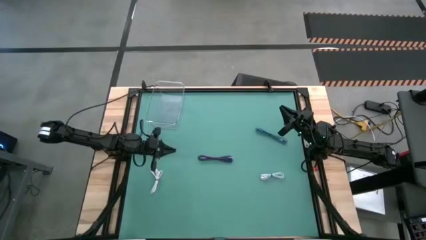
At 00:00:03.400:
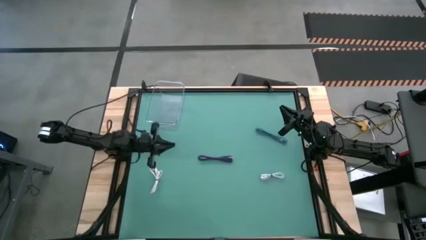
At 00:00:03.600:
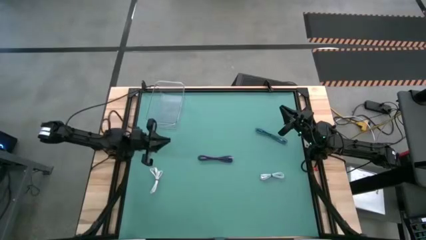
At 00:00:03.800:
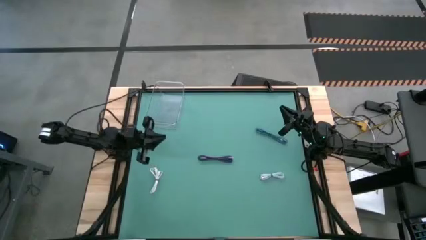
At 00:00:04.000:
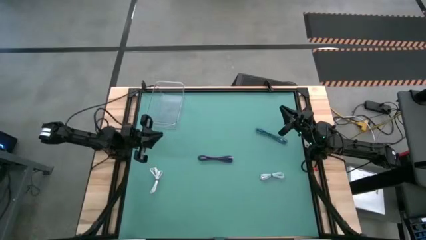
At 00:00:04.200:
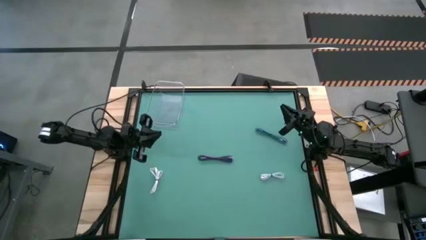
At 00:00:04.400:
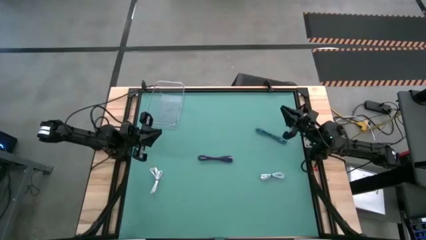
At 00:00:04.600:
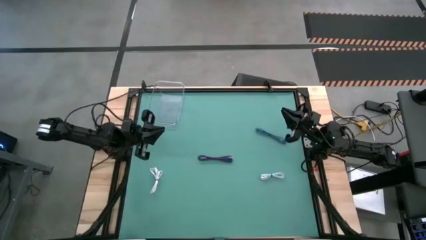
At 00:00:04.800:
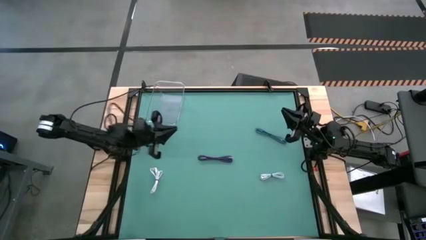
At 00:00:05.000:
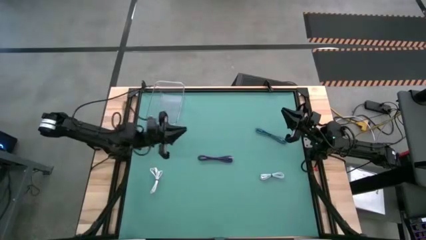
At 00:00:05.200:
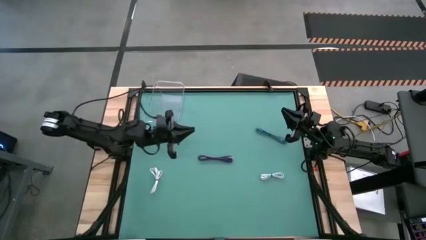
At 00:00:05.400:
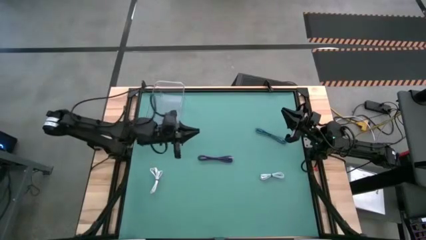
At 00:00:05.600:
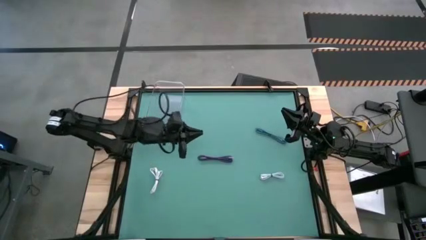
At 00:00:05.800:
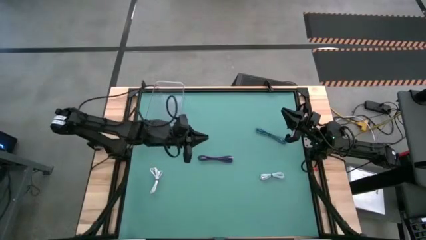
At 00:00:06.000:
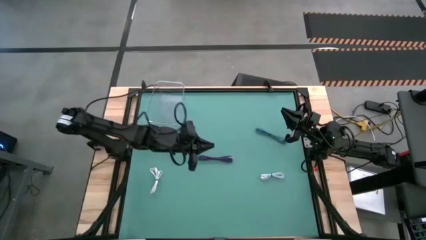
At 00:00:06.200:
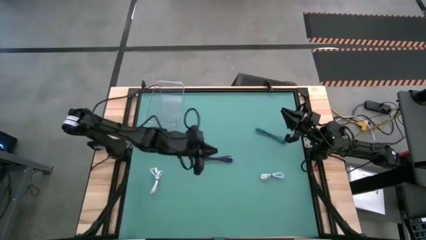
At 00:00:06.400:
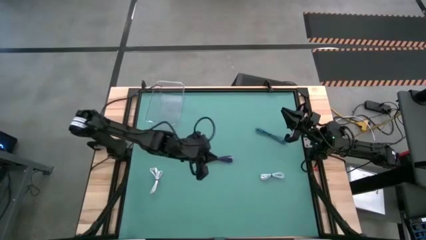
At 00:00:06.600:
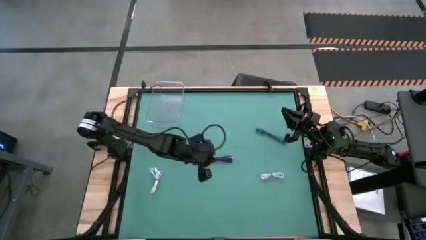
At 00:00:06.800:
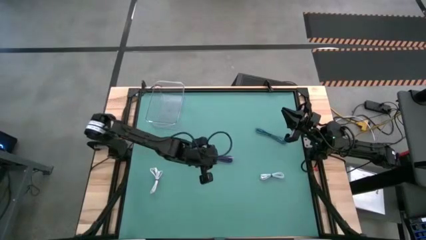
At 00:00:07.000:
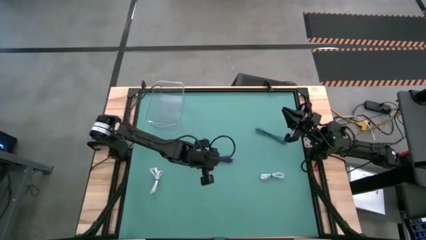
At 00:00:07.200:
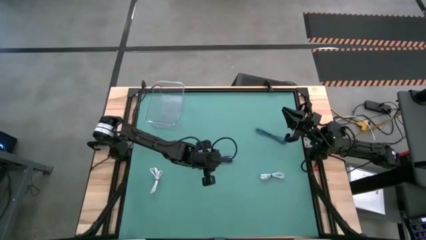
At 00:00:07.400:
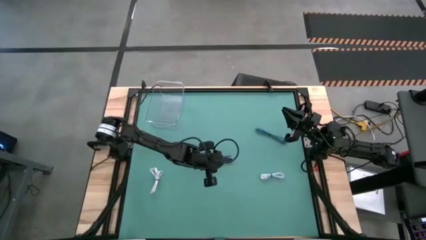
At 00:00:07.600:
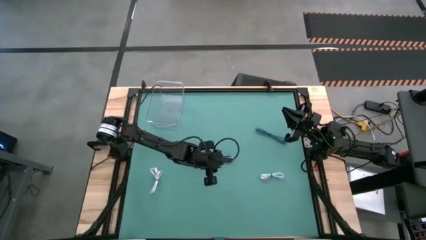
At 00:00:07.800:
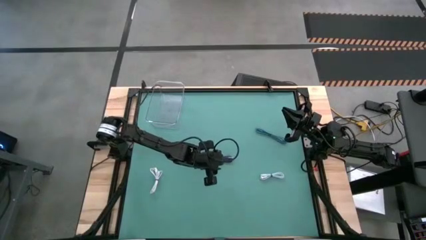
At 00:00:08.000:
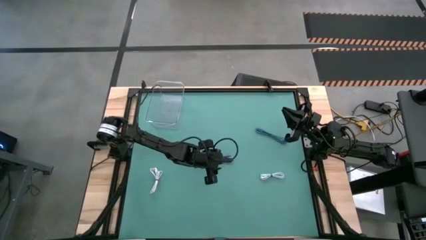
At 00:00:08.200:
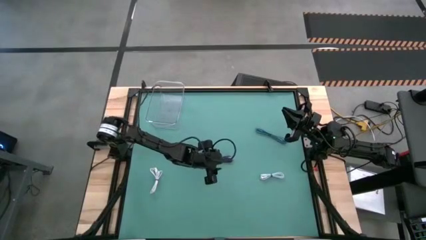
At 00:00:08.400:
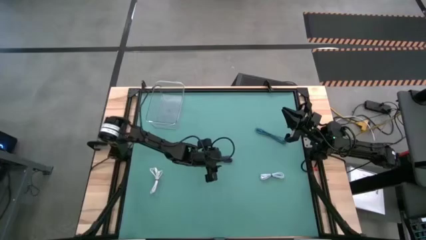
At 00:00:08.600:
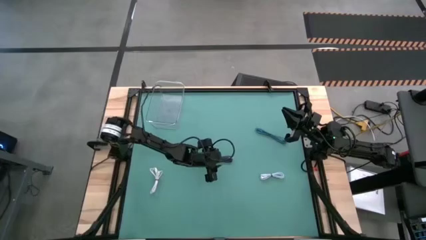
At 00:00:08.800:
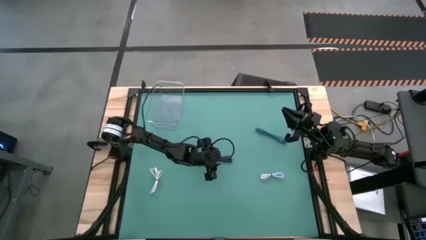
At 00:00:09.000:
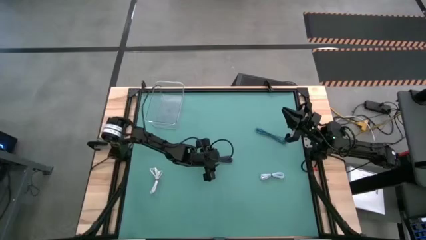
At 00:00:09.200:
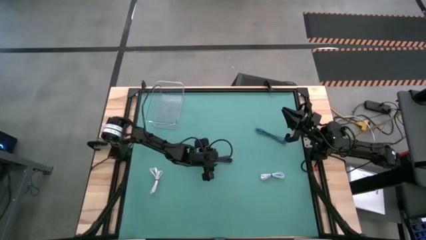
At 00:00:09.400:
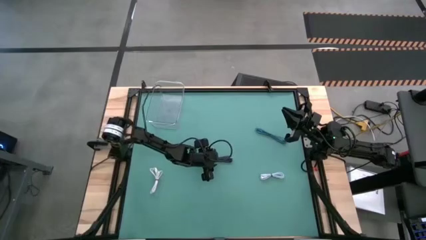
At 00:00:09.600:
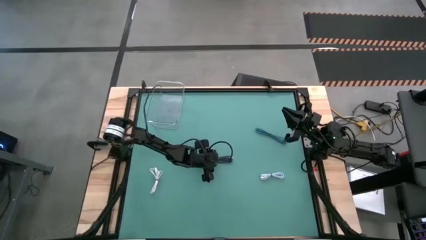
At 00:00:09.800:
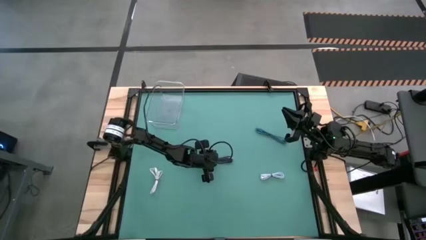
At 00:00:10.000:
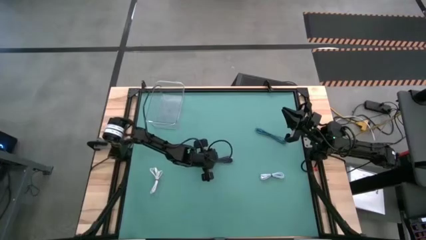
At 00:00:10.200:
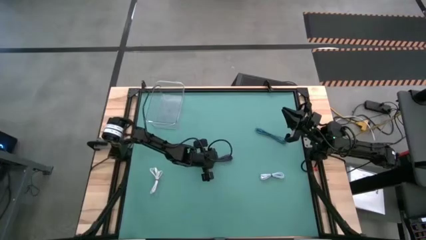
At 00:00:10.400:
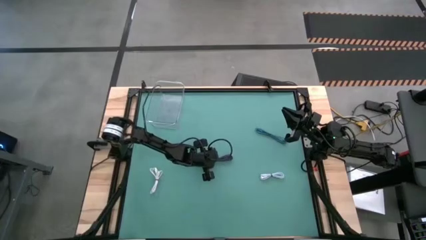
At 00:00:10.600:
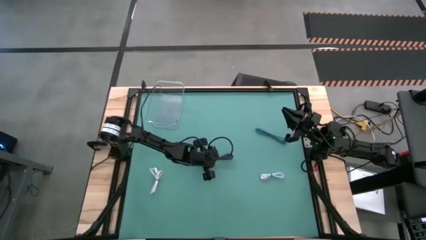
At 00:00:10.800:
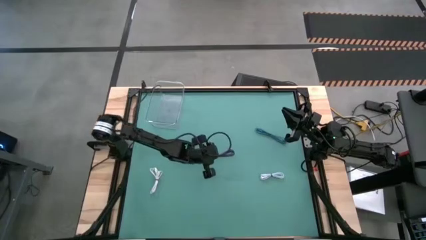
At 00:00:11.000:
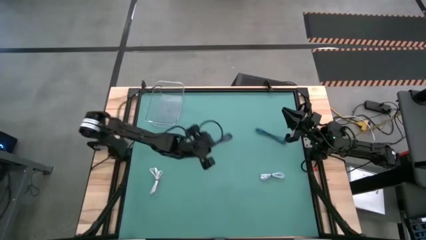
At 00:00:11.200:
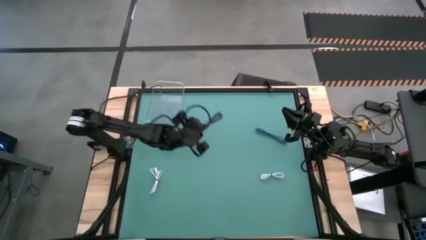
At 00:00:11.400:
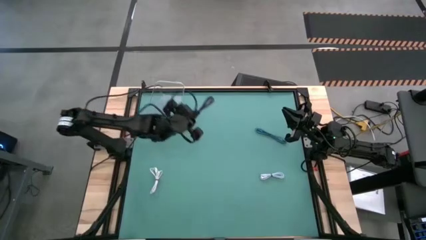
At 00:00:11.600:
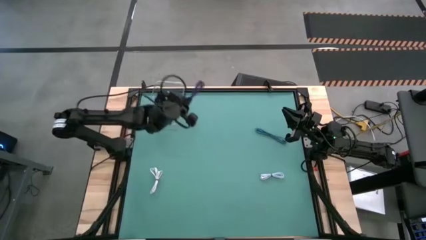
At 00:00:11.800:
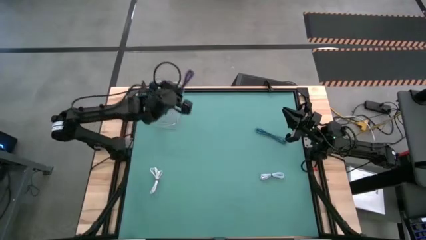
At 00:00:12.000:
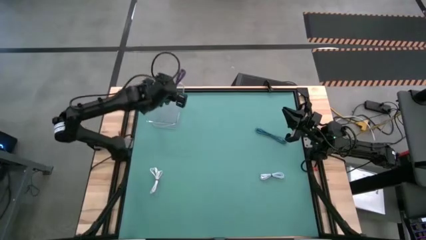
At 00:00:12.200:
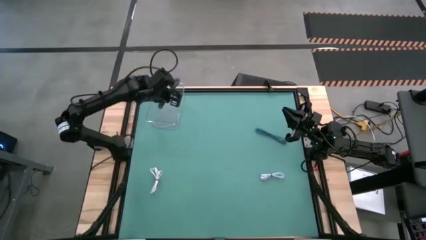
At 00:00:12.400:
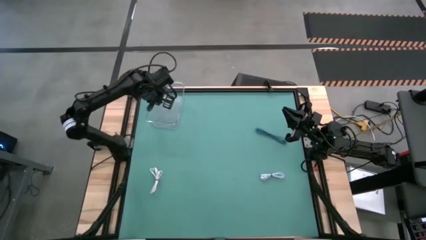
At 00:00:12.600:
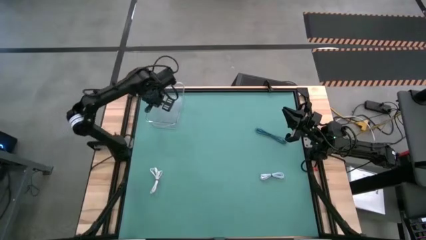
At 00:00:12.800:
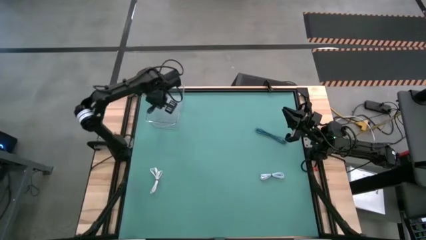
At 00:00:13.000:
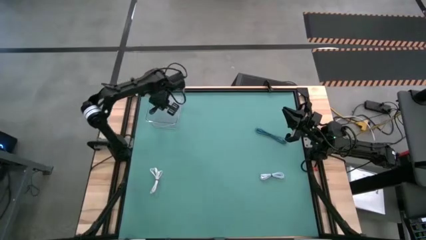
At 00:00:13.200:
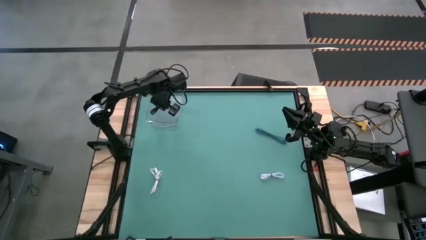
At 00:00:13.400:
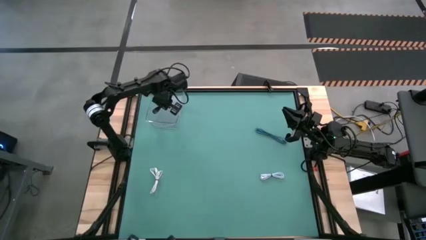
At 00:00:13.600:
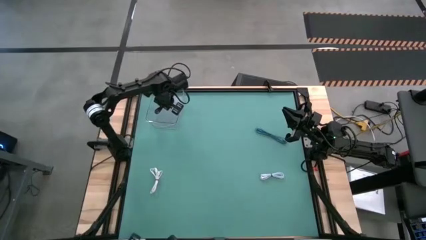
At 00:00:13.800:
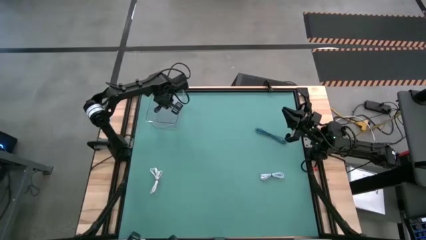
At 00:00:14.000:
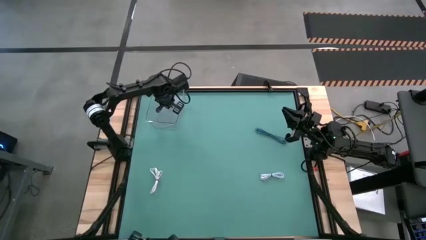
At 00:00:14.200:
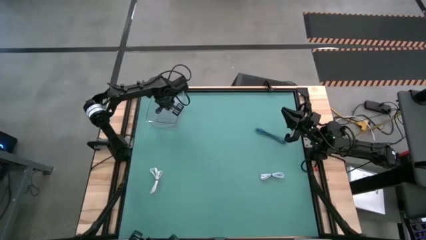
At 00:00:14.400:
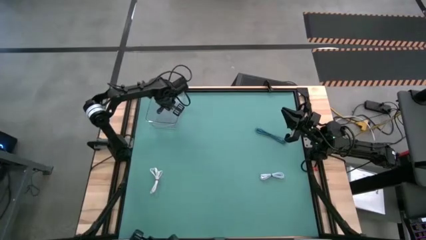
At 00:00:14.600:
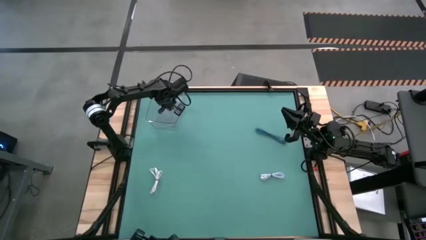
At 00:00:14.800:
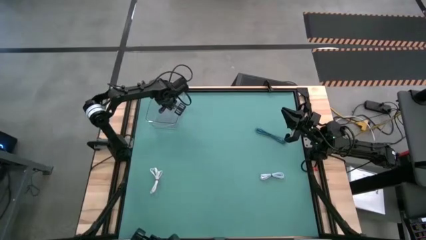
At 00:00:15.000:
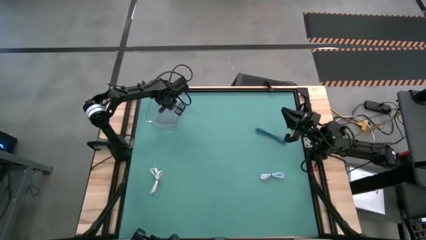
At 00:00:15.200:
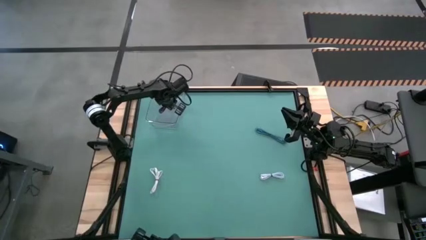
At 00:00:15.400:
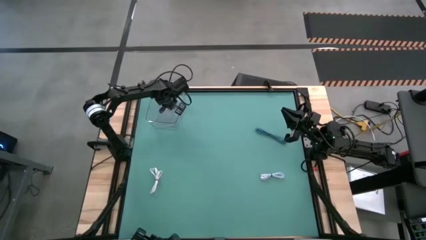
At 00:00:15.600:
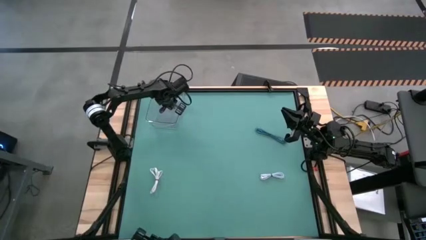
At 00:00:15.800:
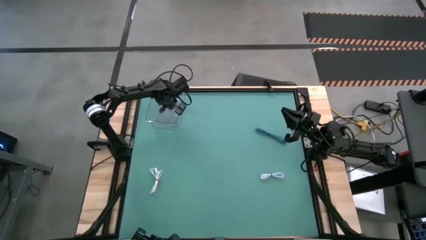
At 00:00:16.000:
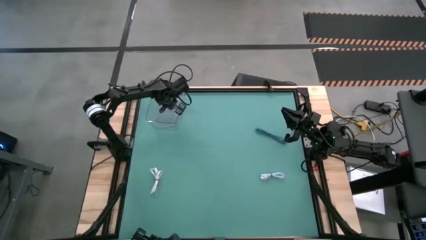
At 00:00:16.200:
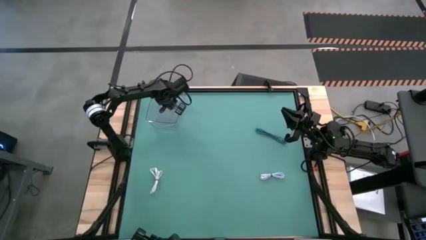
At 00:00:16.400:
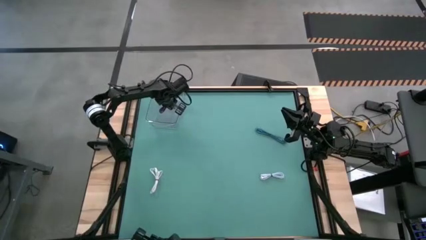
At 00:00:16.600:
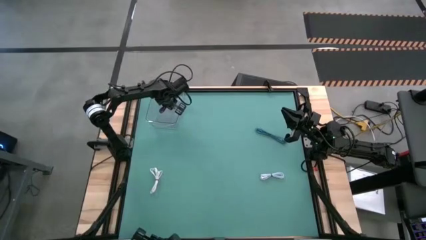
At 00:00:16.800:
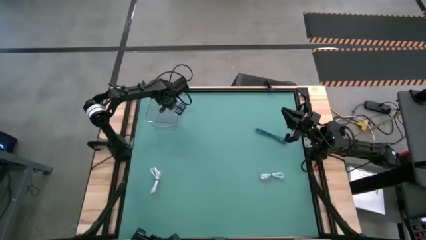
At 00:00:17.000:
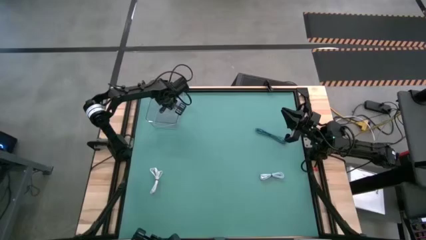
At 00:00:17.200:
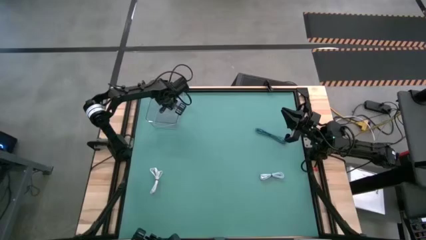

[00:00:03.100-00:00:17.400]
Task: Pick and place USB-C Cables
Put the purple charger cable into the transparent bin
